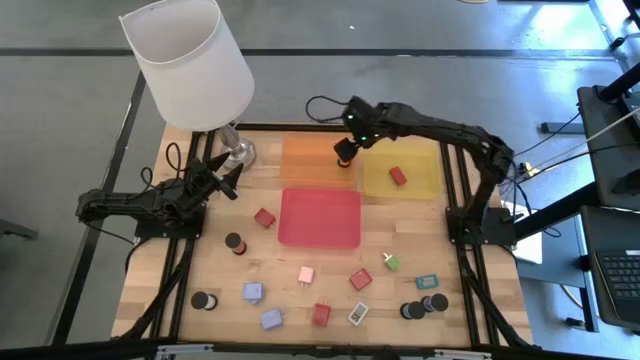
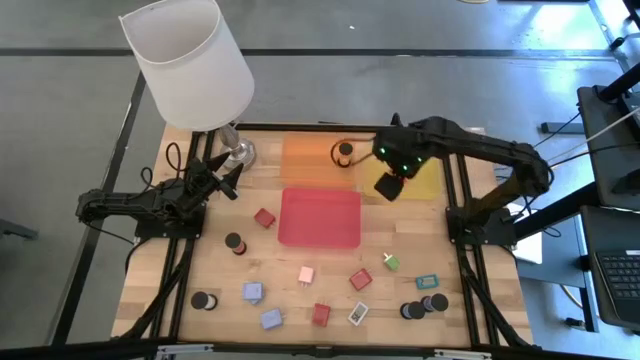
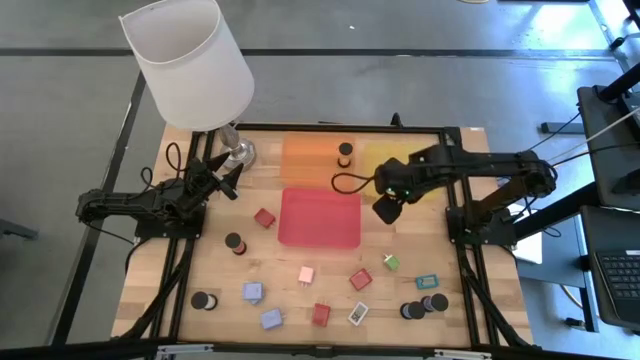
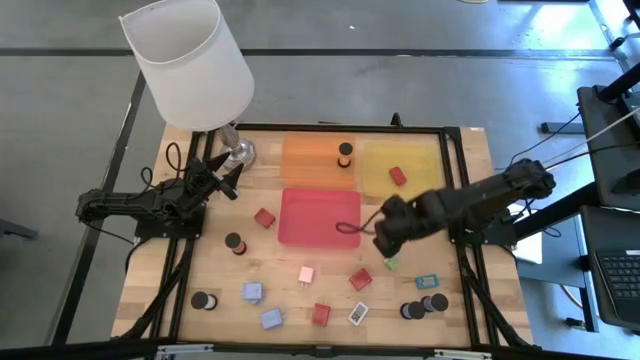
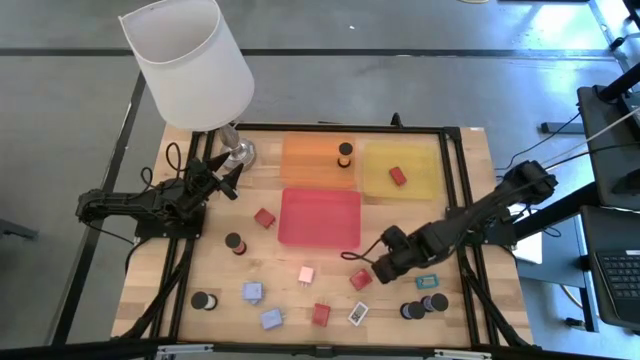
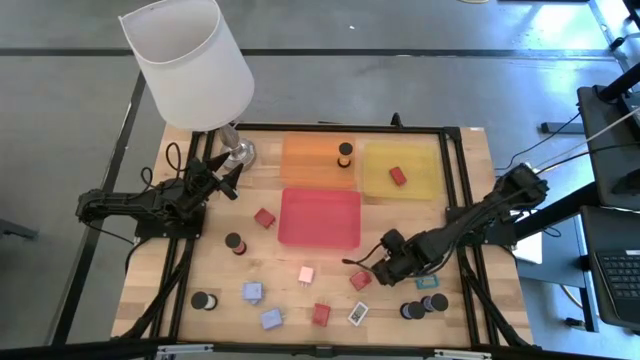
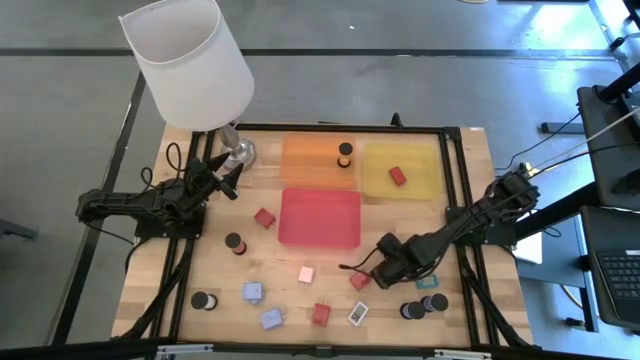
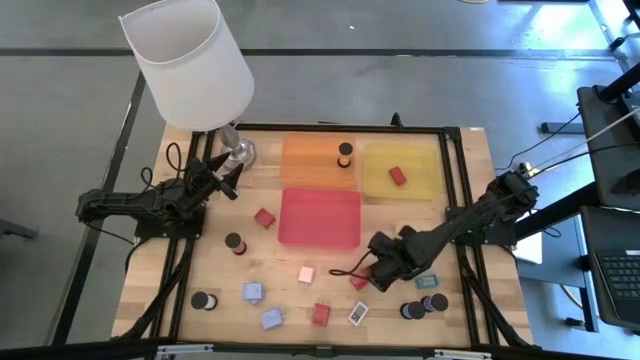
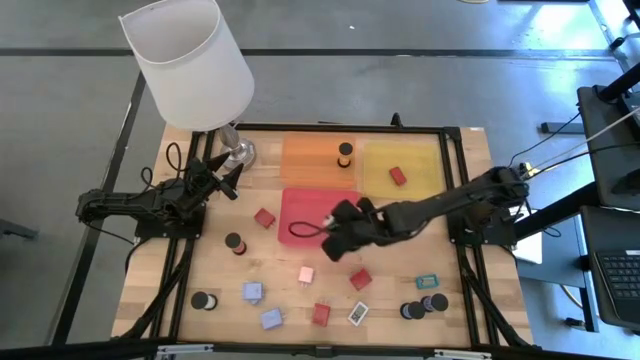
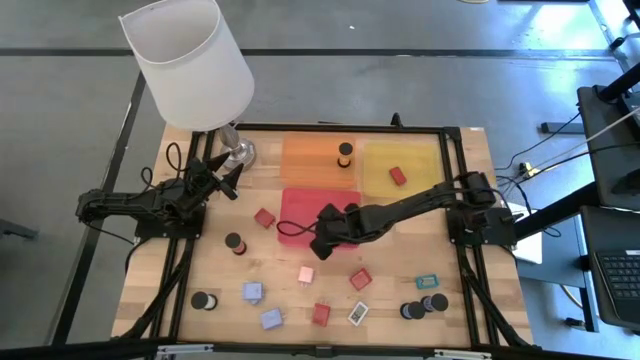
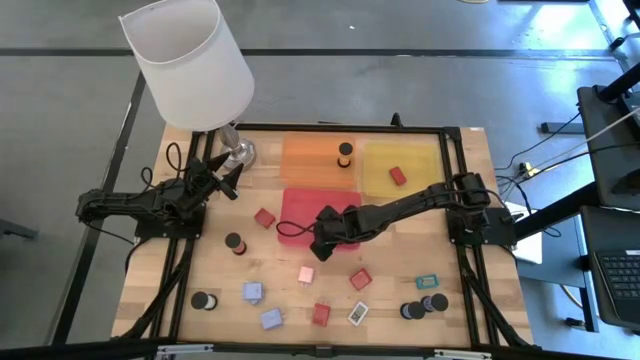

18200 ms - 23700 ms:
Task: Pick & Place Office items
Put the green charger adapter into the red bin

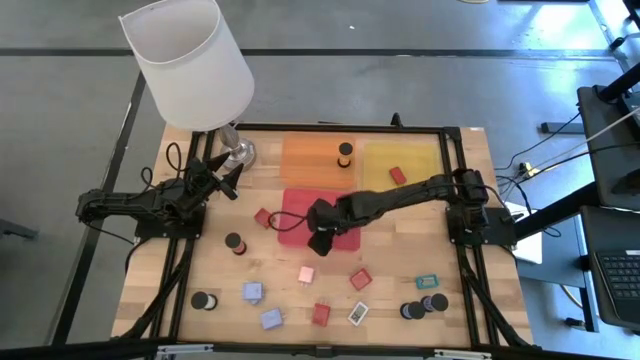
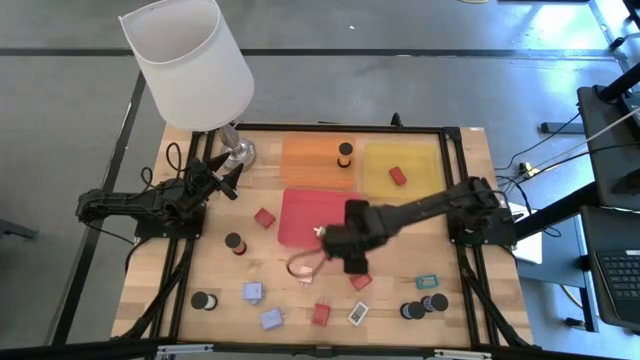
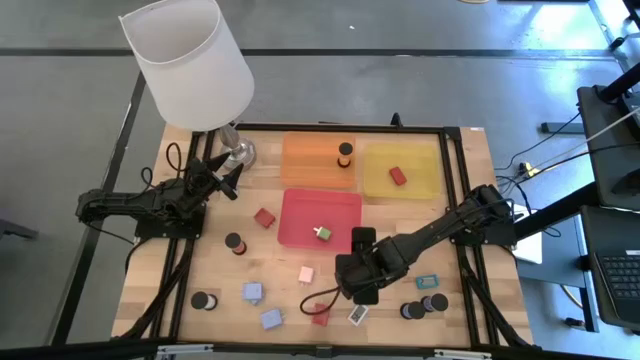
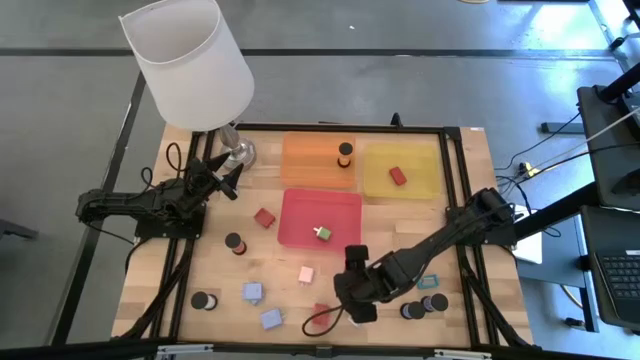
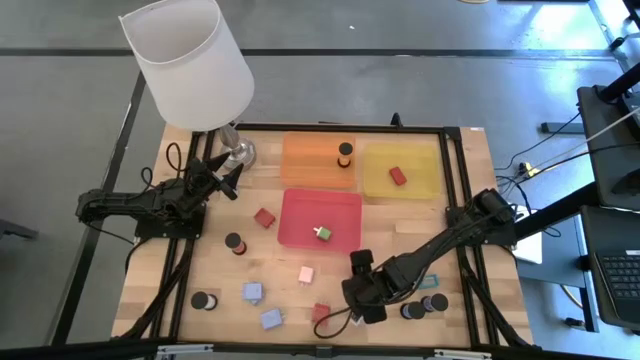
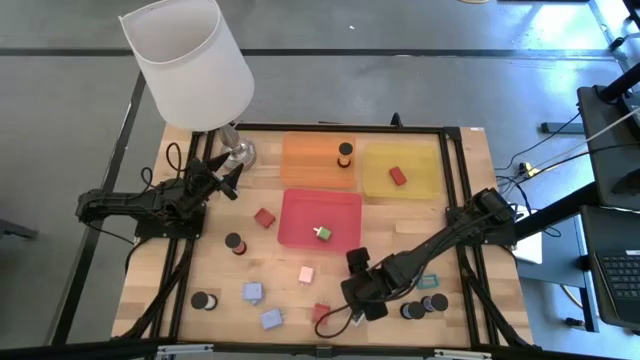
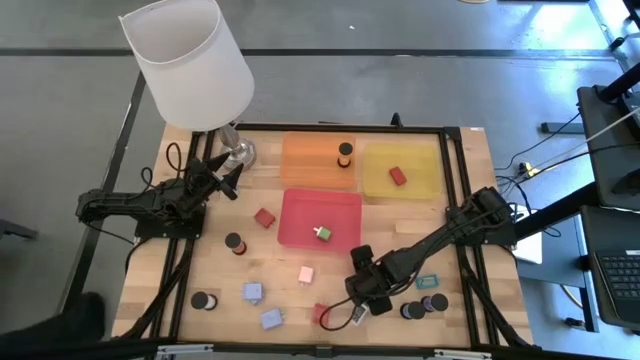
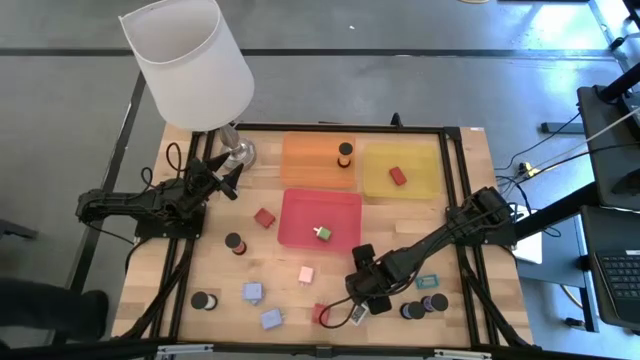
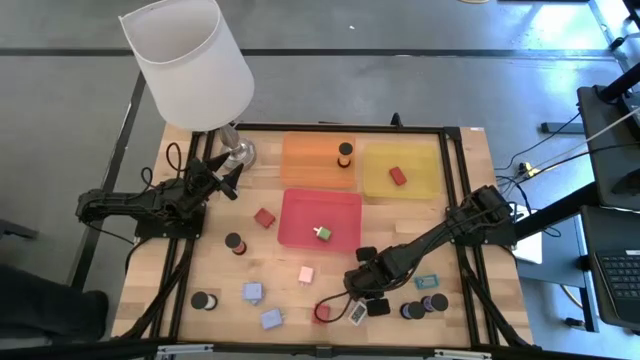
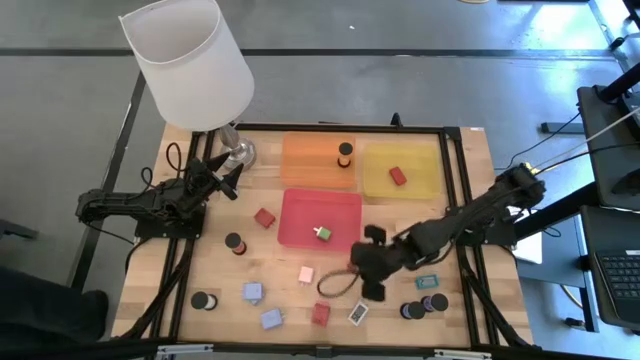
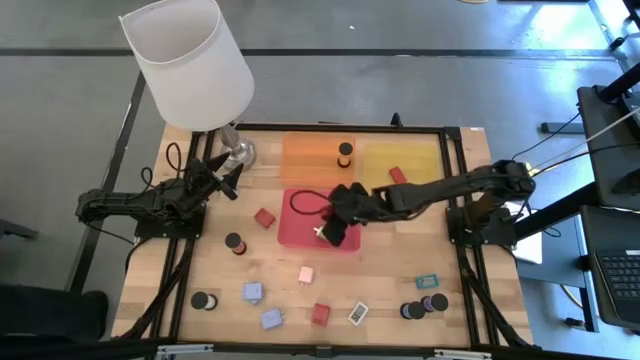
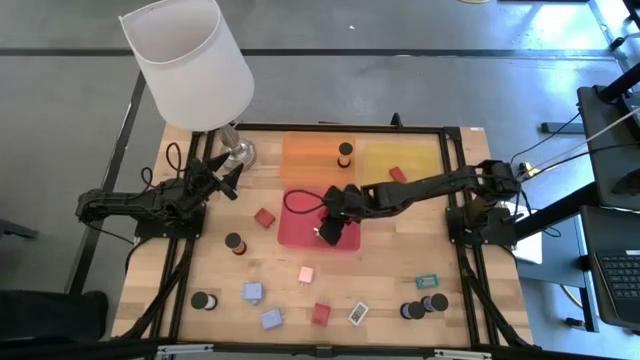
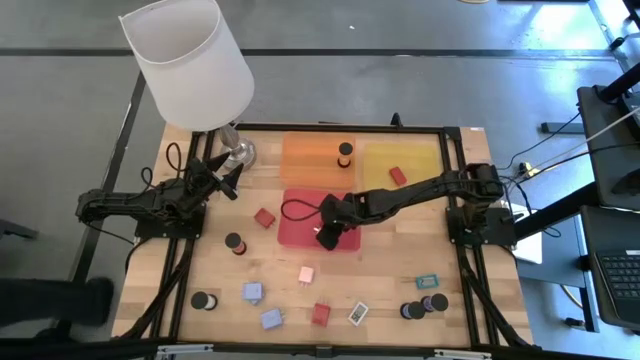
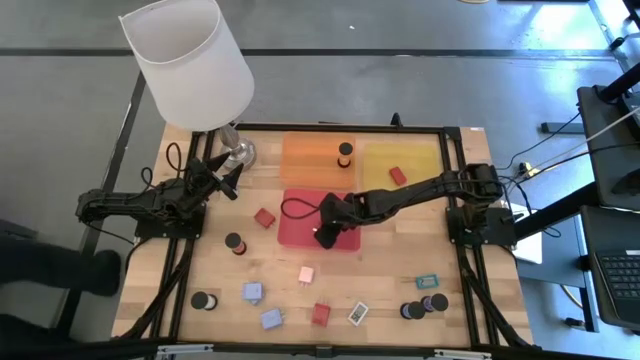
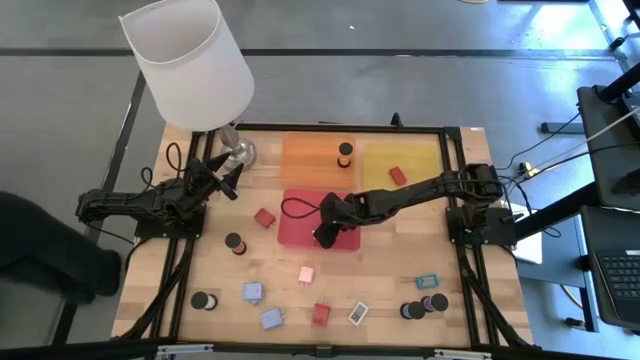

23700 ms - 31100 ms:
Put the right red charger adapter into the red bin

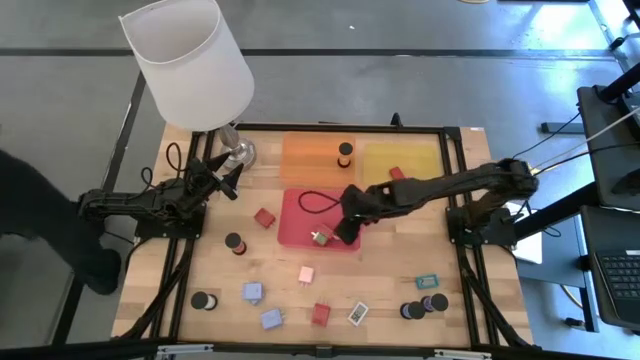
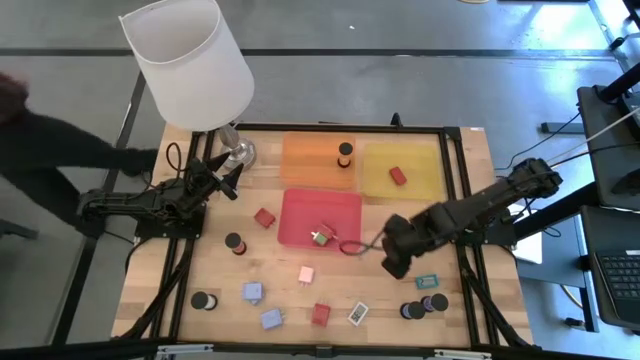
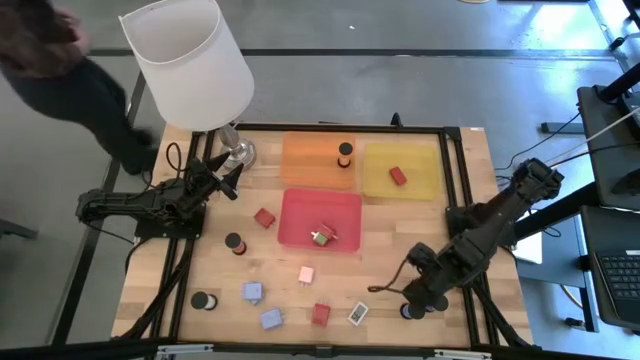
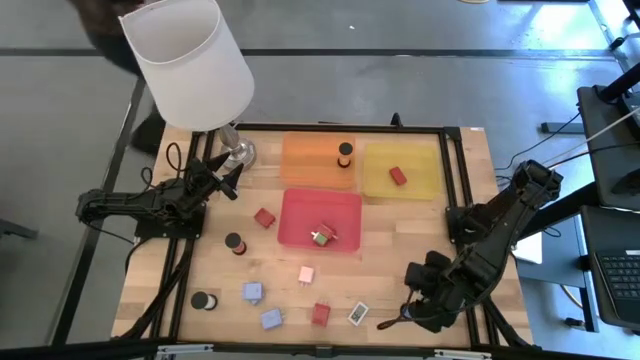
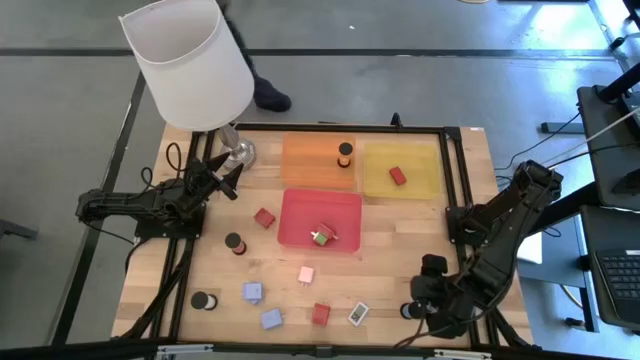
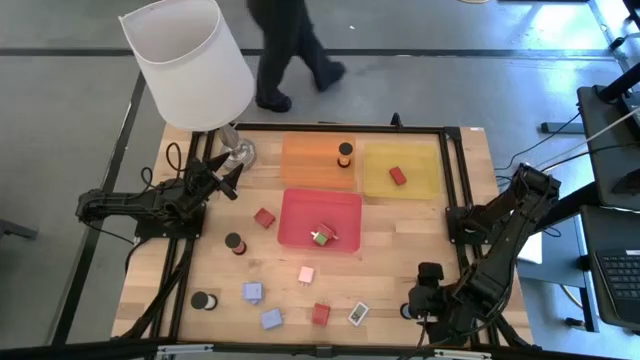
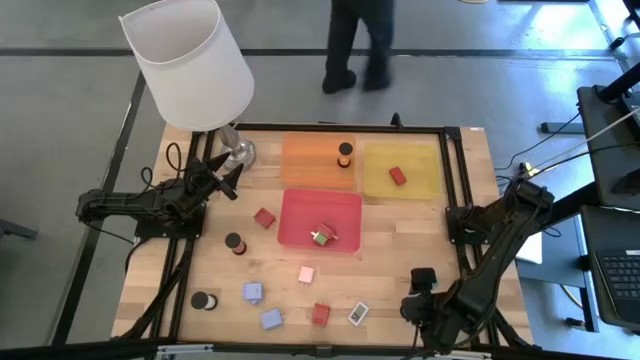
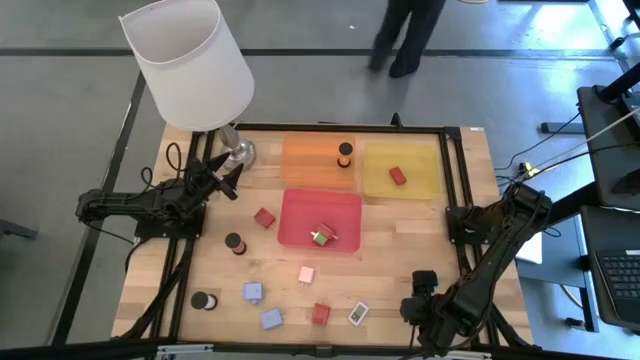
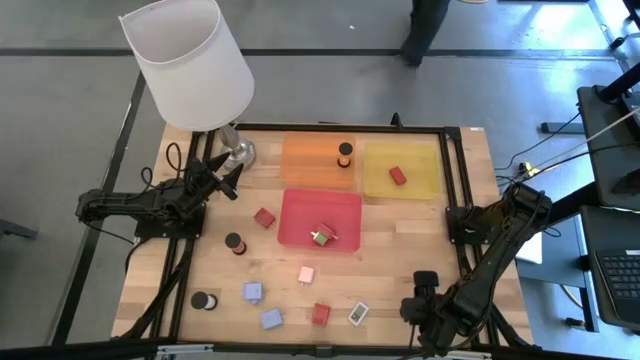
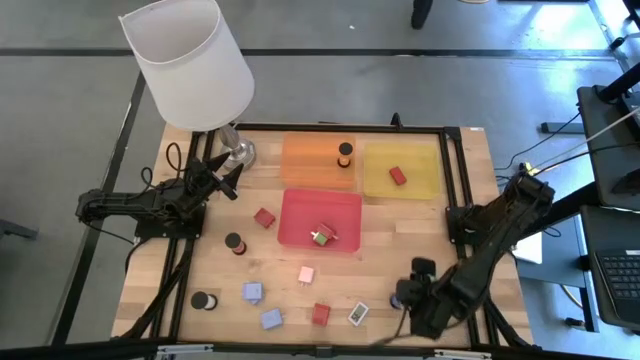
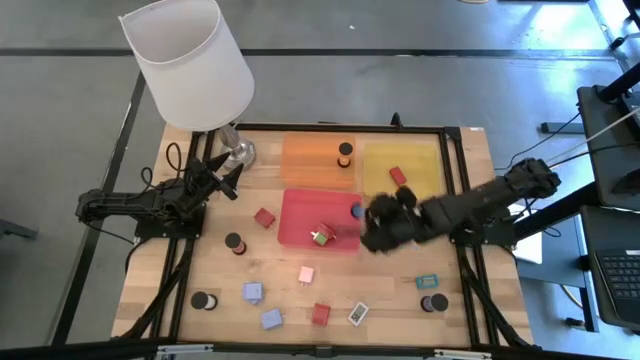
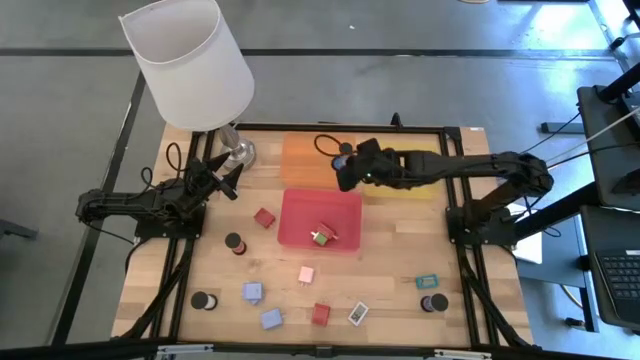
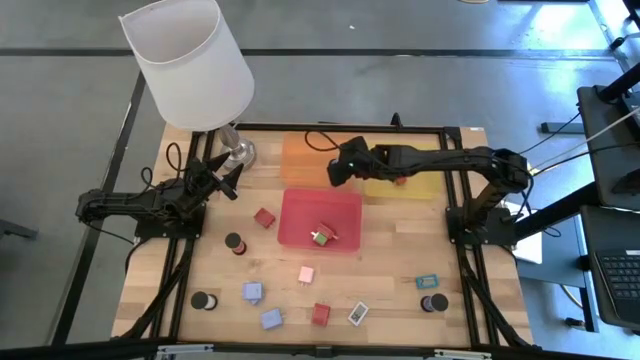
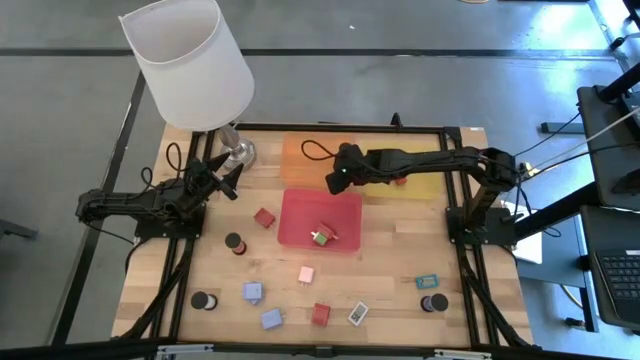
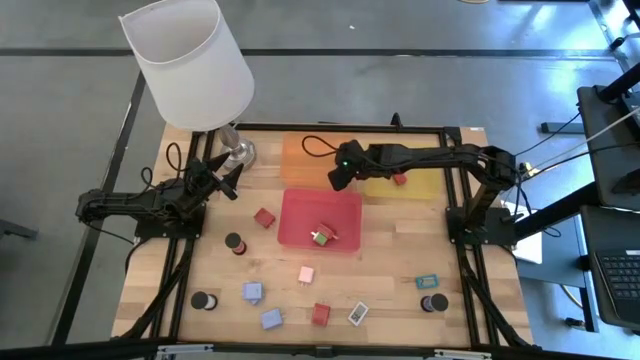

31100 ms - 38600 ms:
Put the left black blue hourglass into the orange bin
